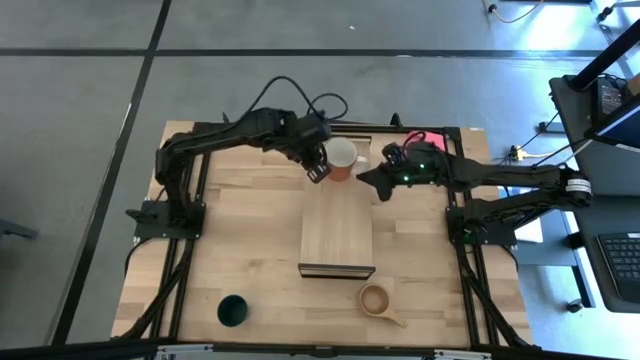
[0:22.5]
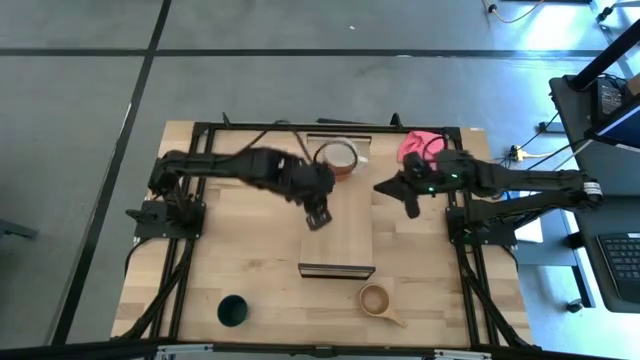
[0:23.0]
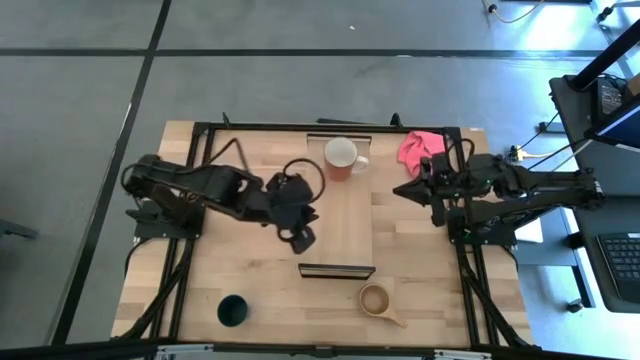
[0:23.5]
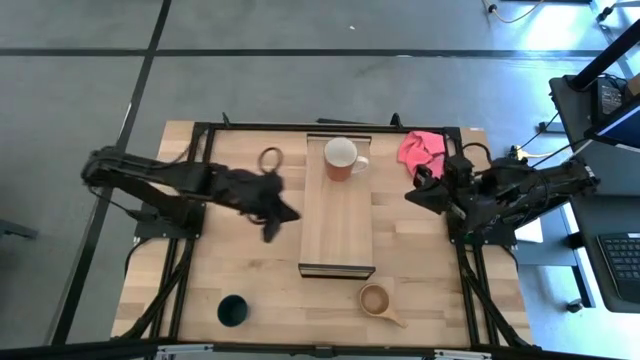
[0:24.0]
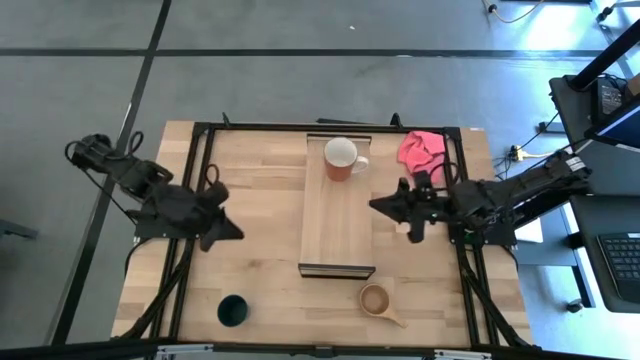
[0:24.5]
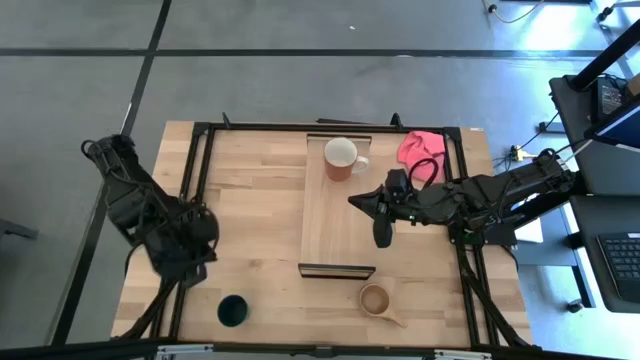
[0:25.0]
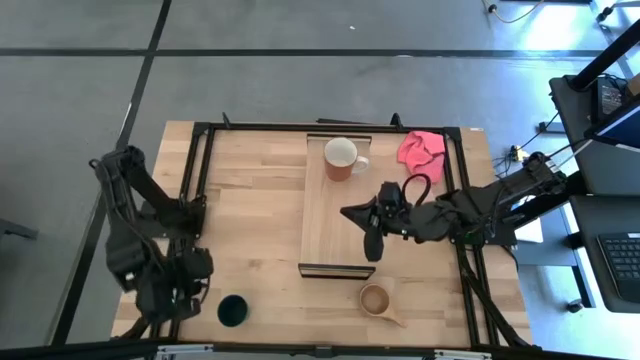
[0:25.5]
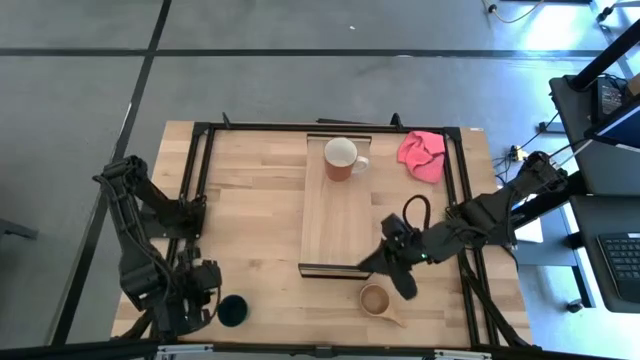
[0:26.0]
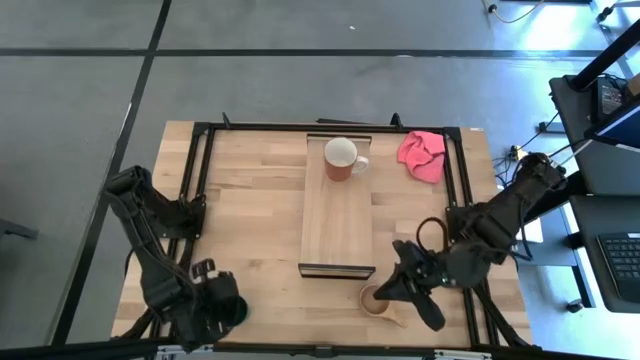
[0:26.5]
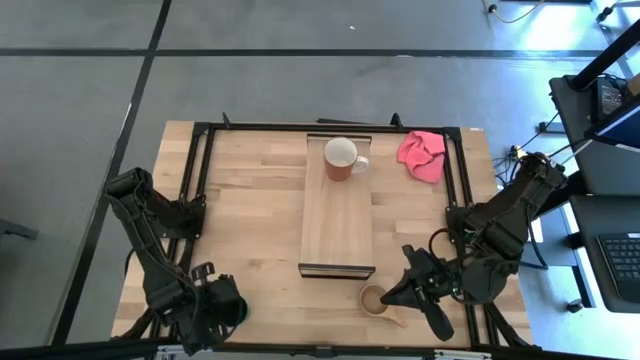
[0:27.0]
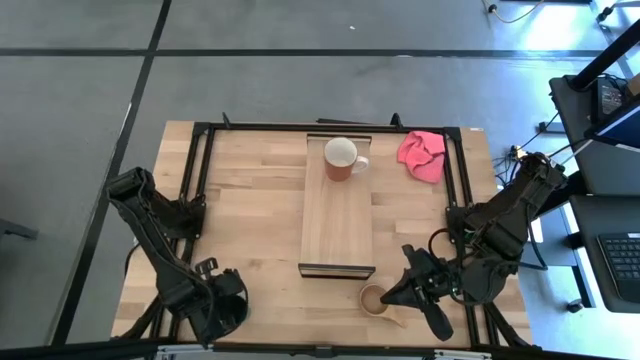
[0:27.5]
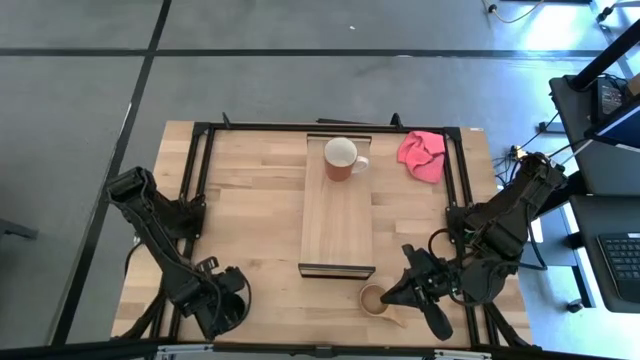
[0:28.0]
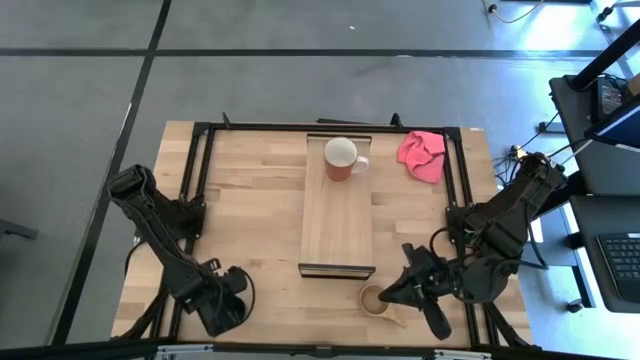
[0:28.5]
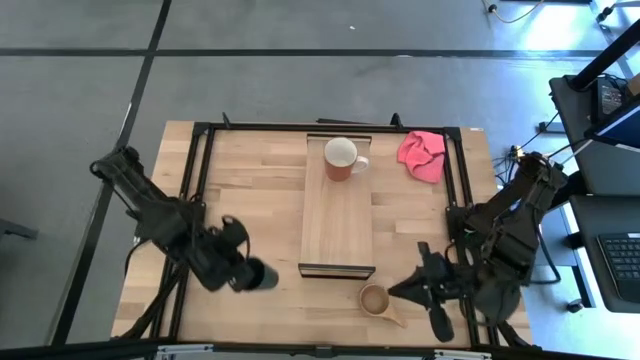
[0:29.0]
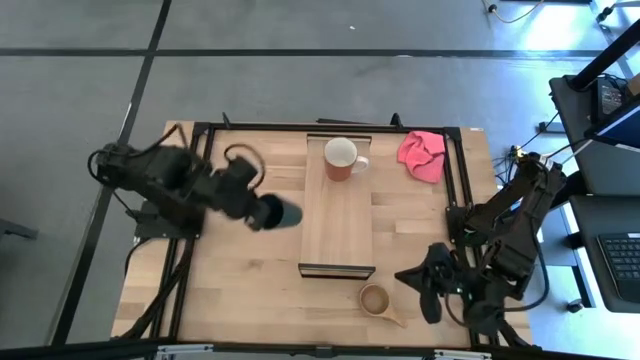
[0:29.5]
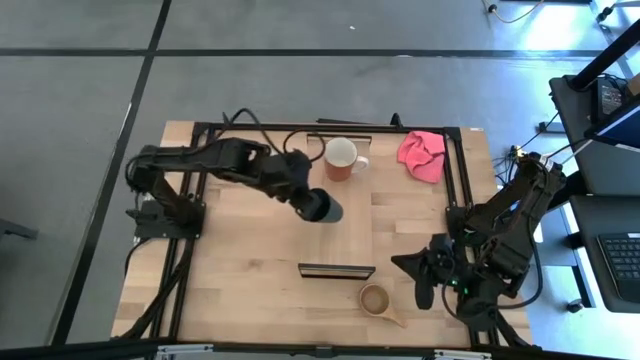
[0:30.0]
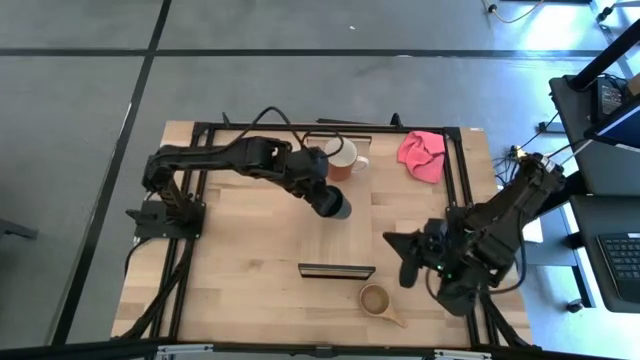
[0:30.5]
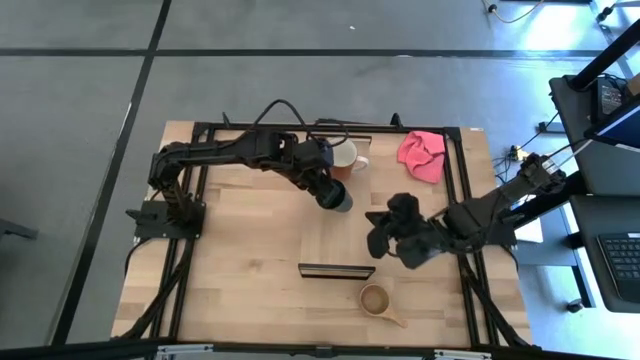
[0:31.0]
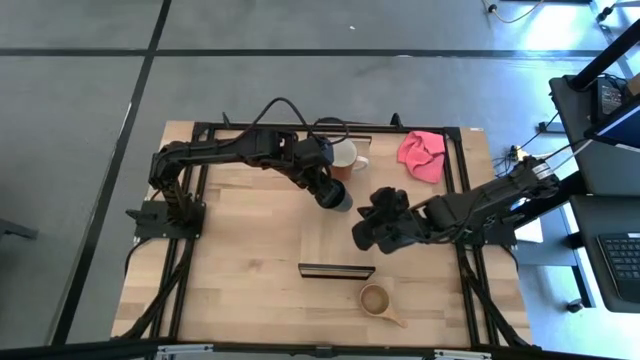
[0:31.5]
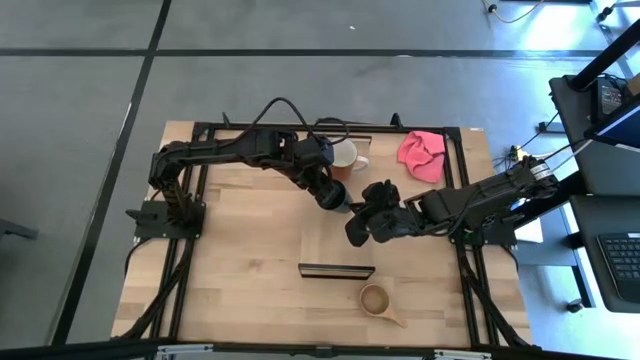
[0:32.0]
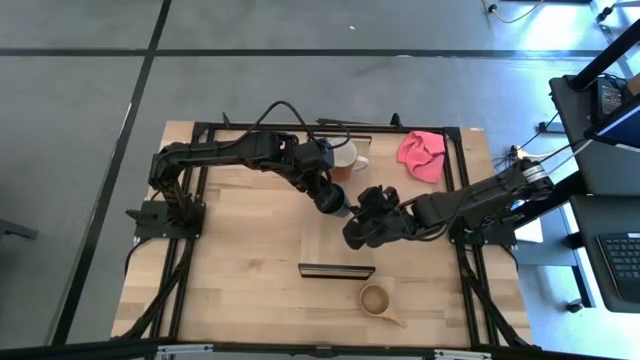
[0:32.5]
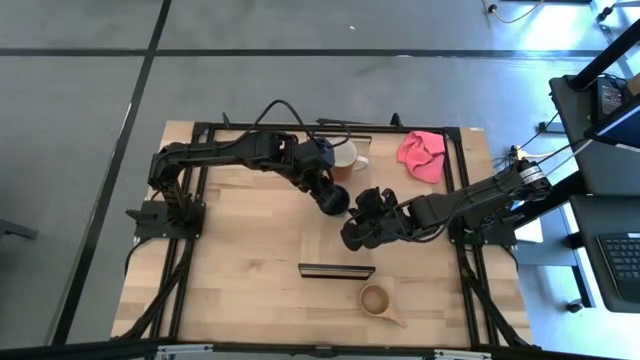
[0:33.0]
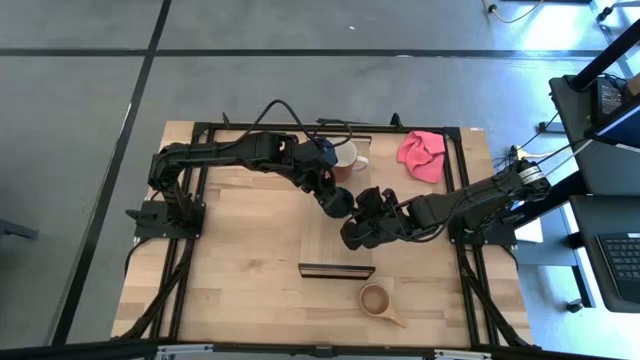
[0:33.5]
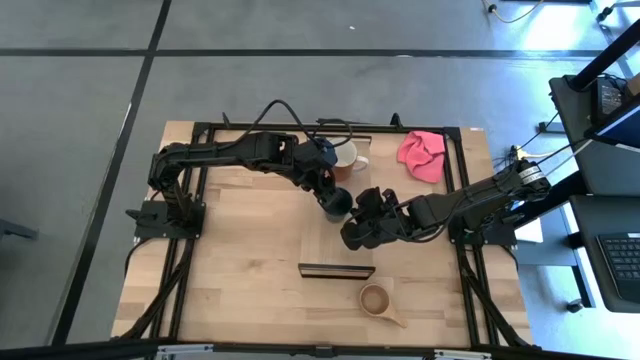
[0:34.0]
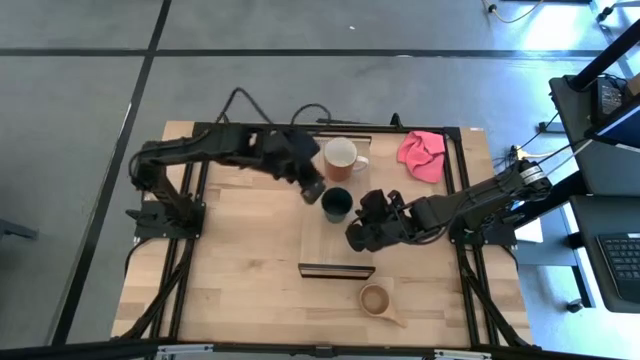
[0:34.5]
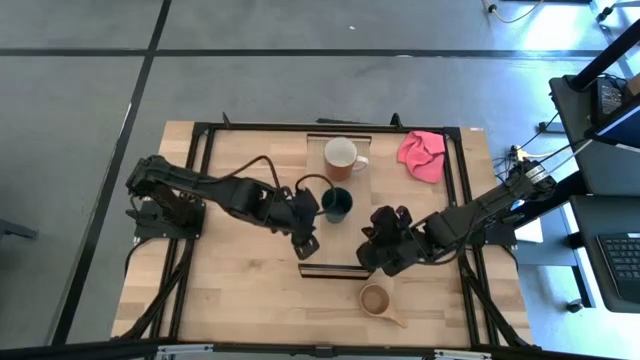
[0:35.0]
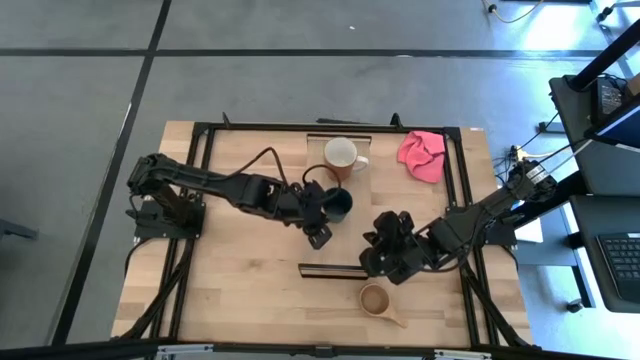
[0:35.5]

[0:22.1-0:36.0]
Task: Stack small to large cups/mugs on shelf
Put the dark blue cup on the shelf

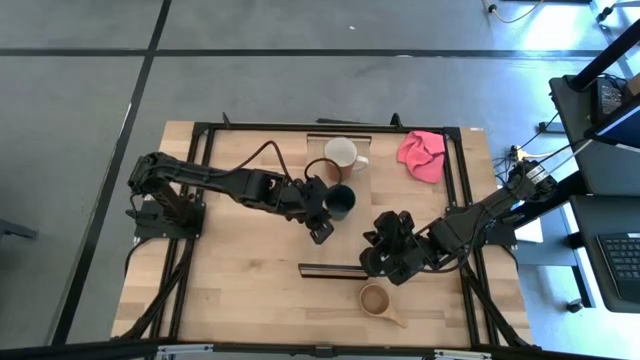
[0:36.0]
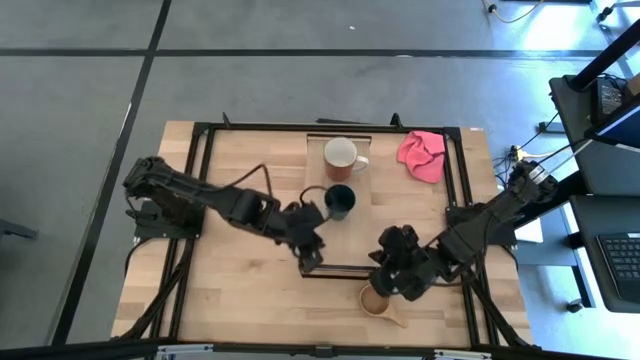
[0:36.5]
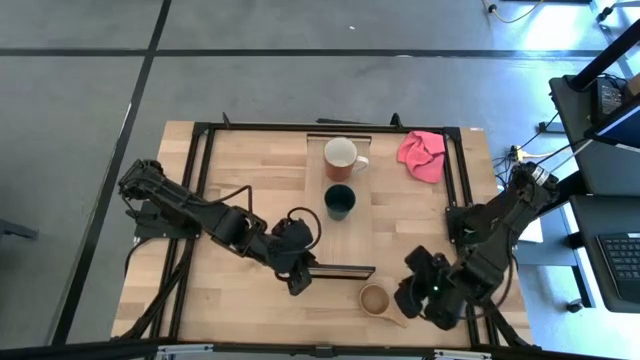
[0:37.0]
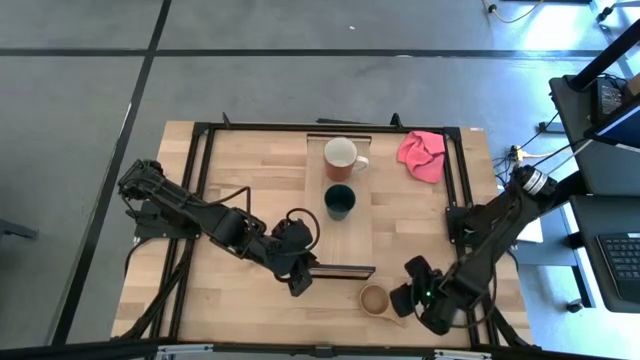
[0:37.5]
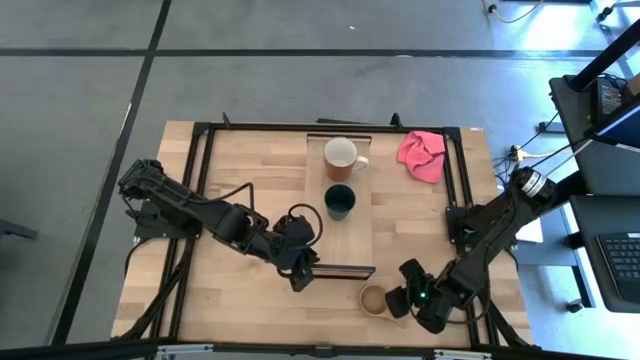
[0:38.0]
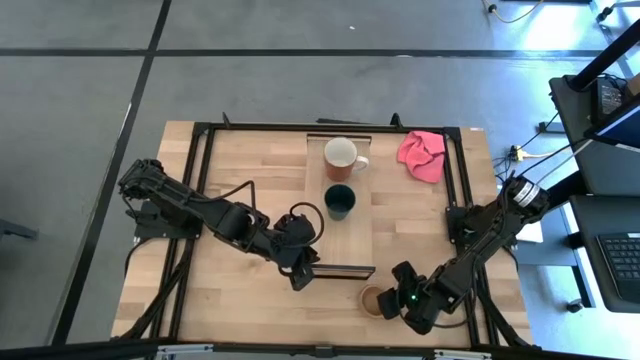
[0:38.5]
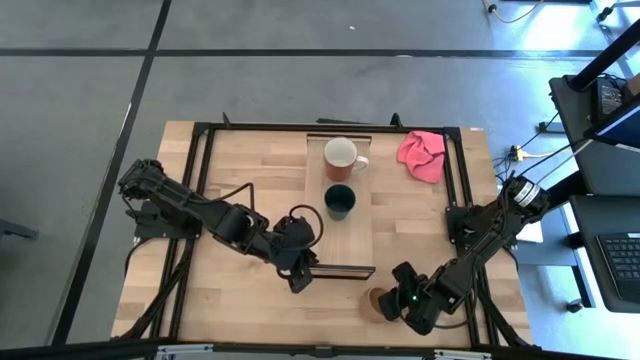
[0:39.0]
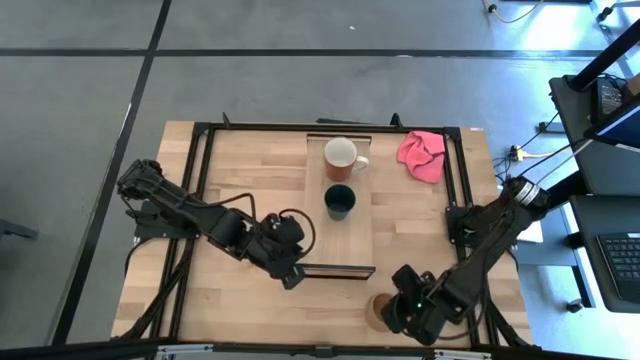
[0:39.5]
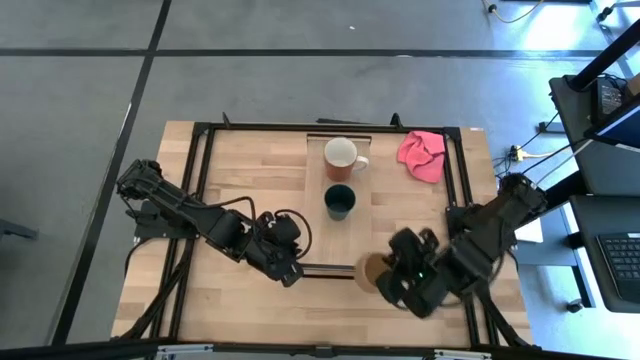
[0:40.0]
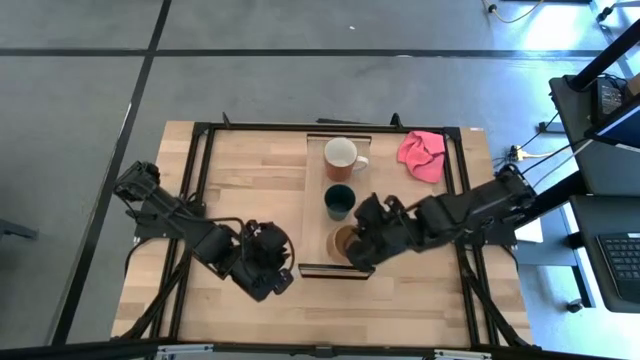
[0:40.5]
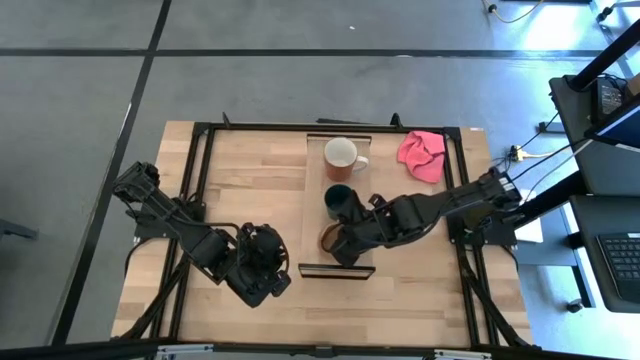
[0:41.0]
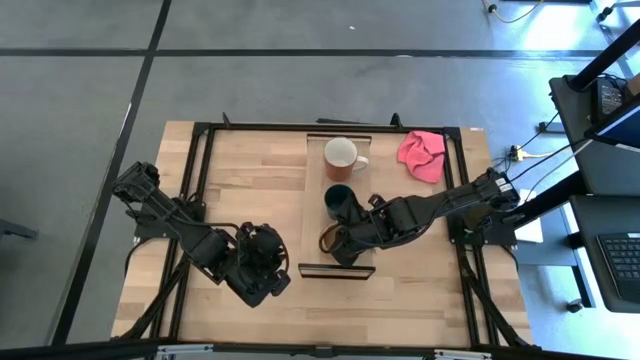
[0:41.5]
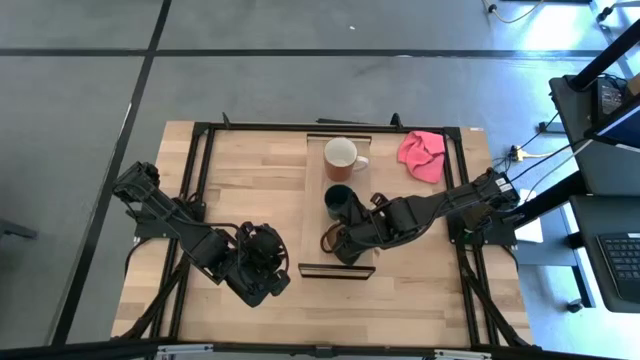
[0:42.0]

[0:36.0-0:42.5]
Put the wooden mug on the shelf

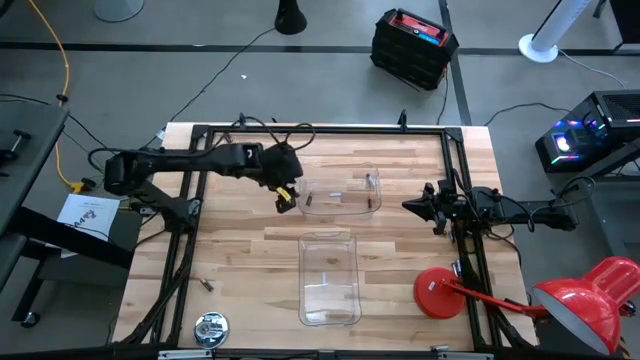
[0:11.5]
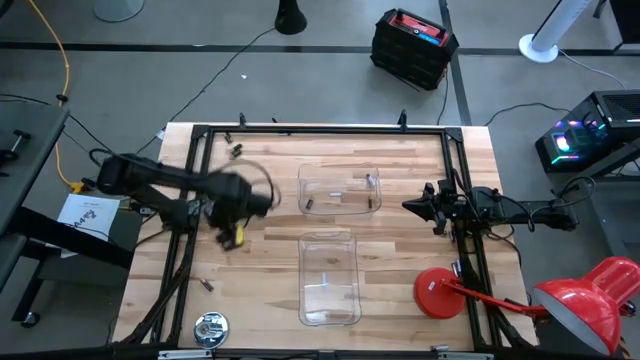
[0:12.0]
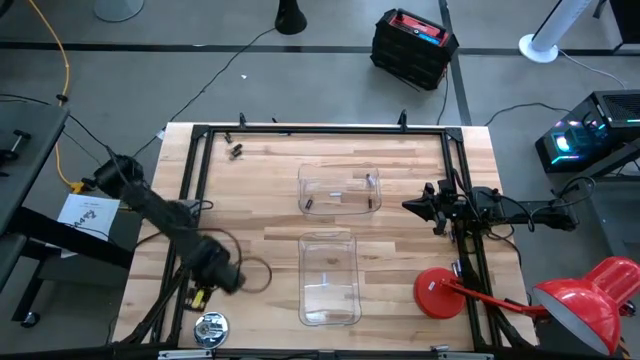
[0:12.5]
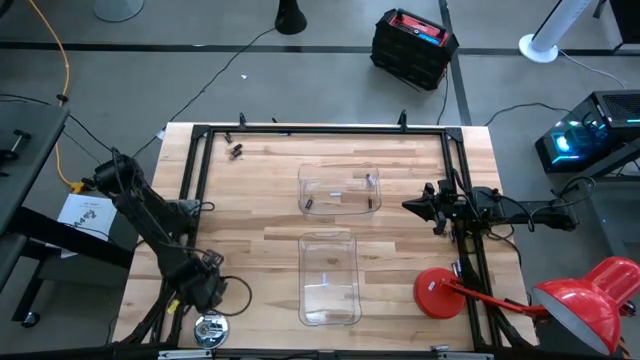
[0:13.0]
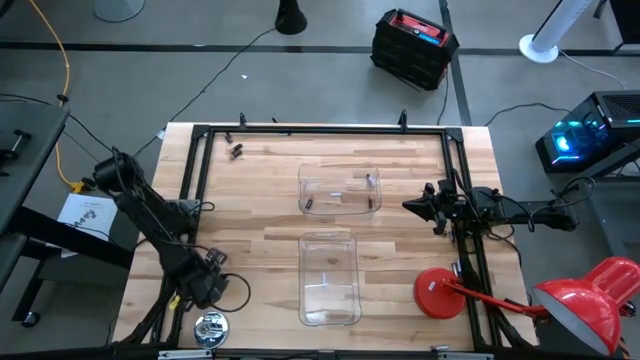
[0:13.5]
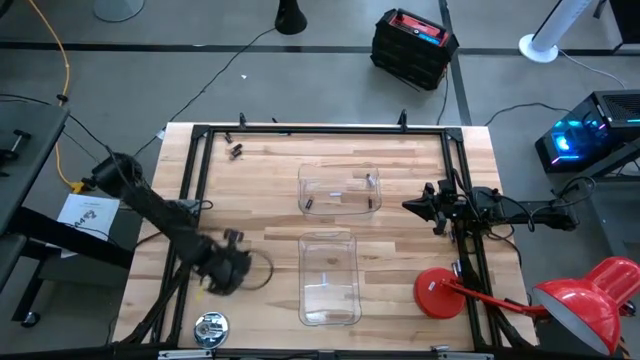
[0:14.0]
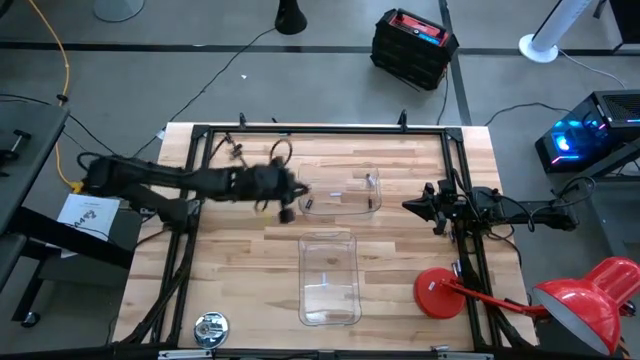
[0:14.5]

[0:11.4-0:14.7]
Task: Sort batteries
Put the black battery into the top transparent bin
